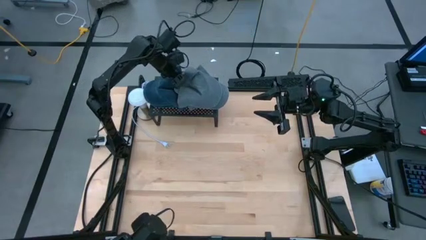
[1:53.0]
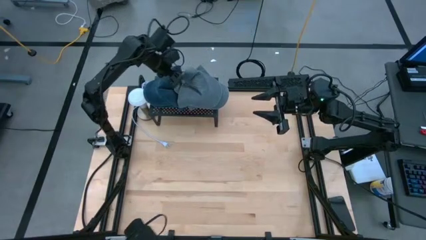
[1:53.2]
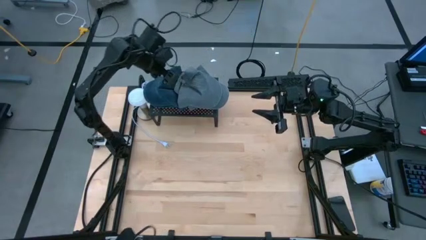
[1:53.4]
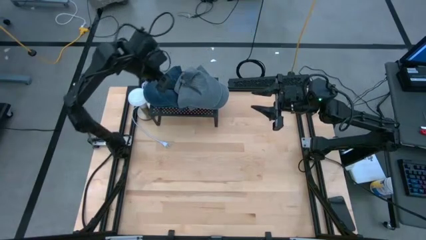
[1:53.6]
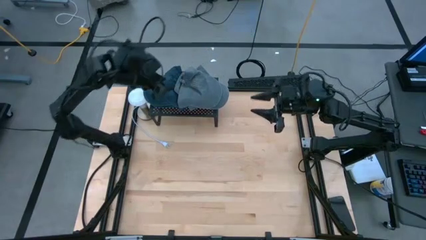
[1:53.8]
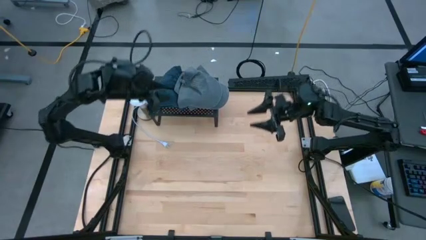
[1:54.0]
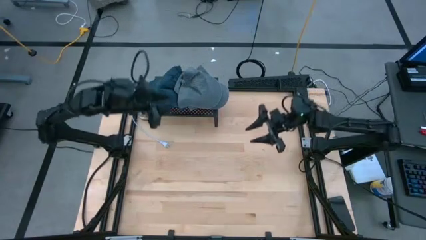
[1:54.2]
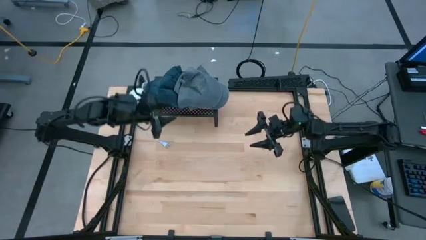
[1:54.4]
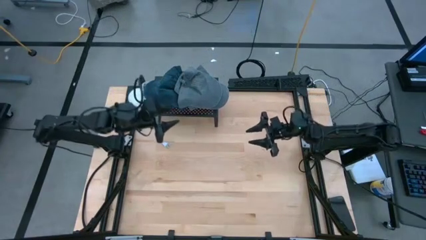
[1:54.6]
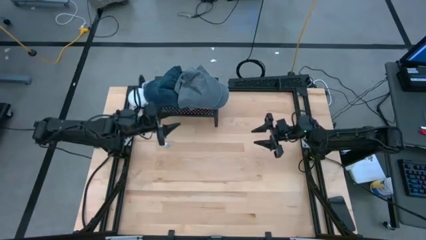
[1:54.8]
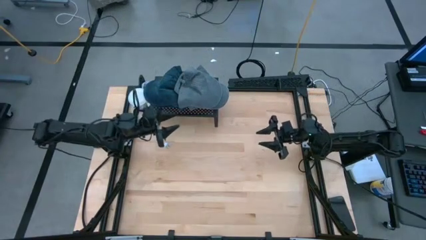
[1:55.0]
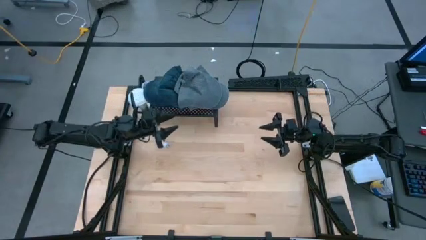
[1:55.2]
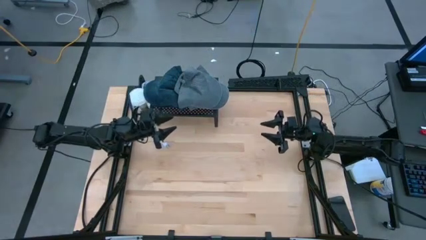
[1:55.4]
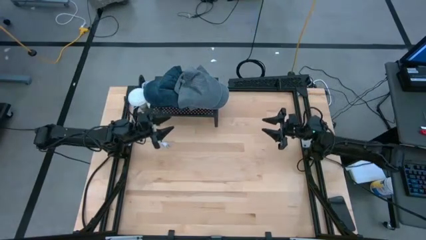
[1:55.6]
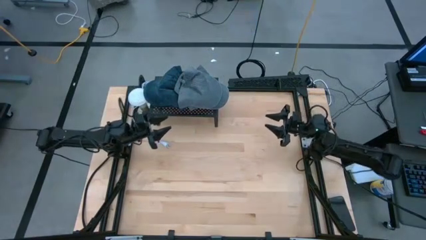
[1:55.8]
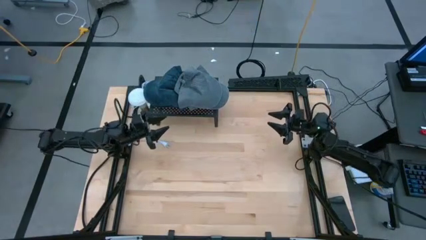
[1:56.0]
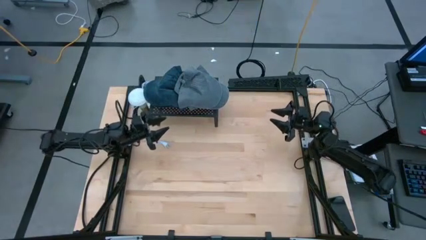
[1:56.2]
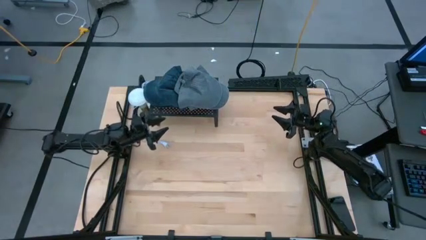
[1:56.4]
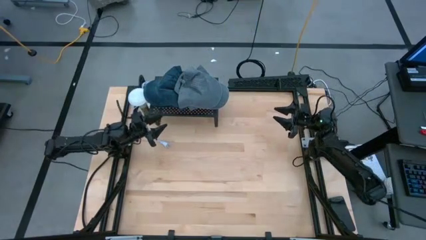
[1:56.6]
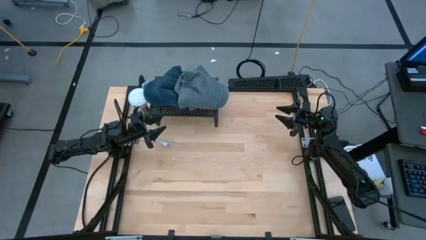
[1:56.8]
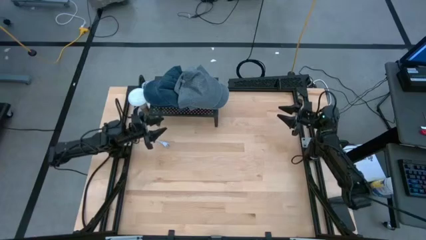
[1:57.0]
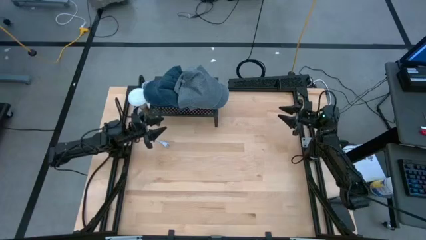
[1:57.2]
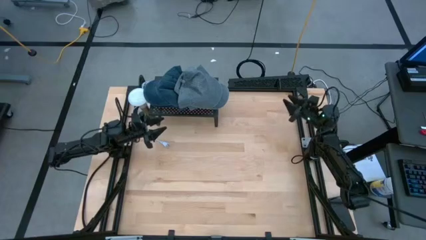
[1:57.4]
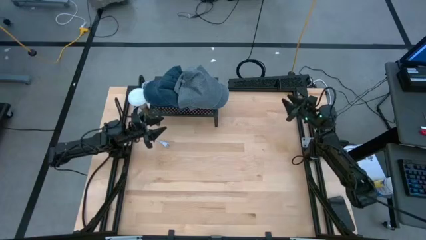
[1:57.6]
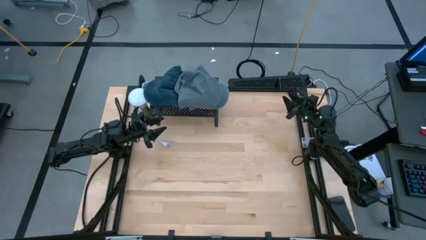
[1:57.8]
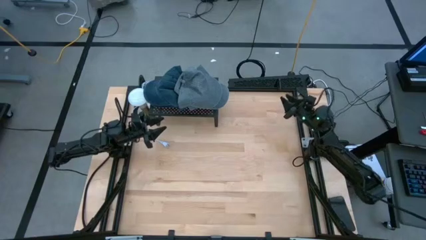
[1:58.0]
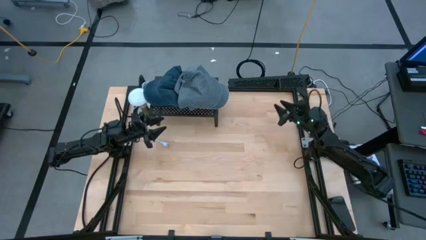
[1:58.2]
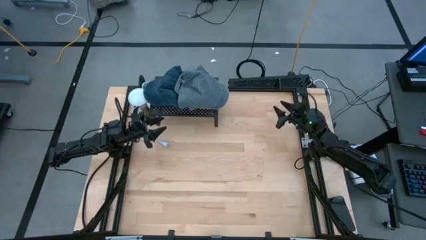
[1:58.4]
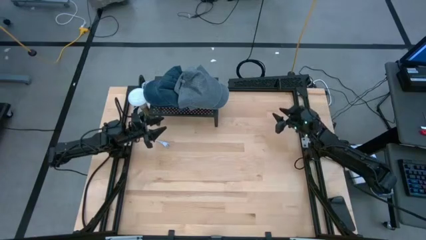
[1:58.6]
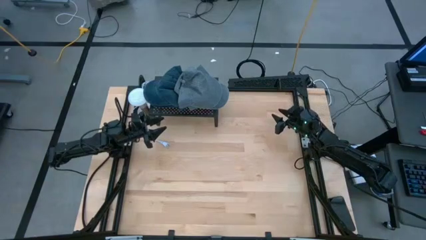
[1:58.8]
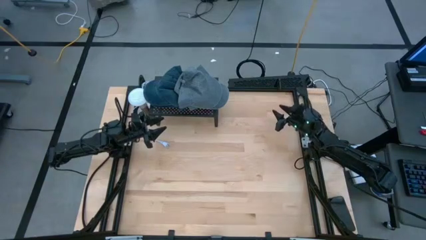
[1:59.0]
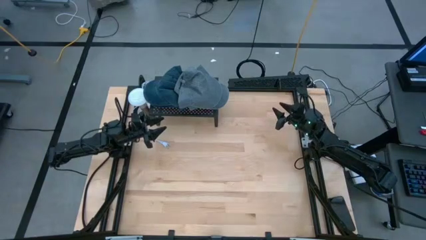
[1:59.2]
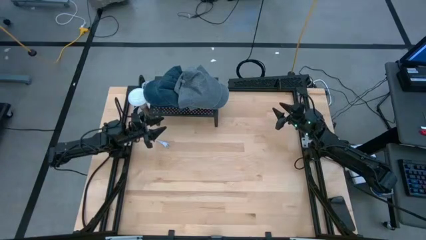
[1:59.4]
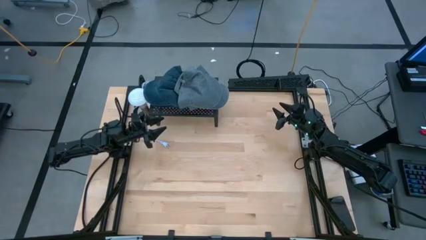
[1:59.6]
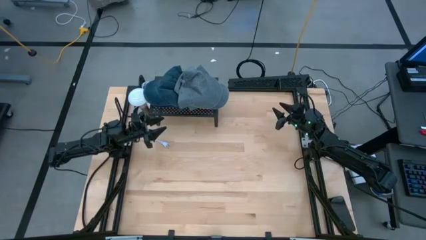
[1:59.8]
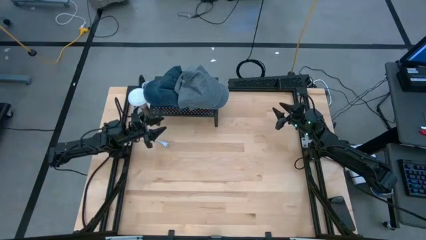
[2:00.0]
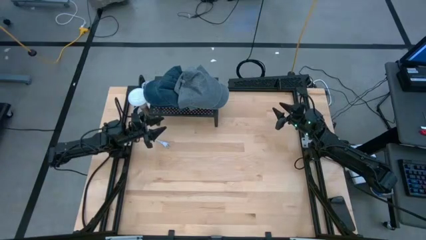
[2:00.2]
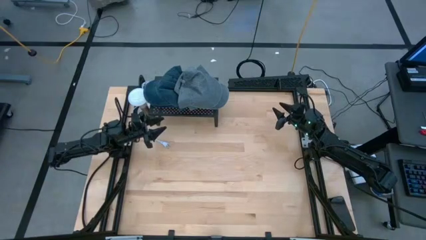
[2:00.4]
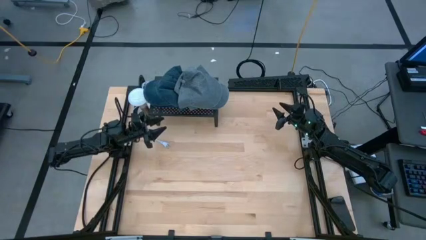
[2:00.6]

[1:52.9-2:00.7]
Task: Pick & Place hat
Return to Home Position

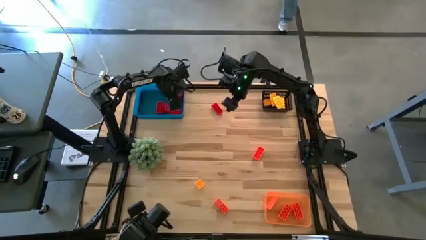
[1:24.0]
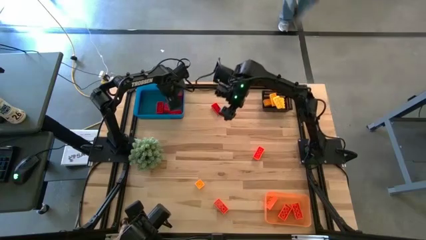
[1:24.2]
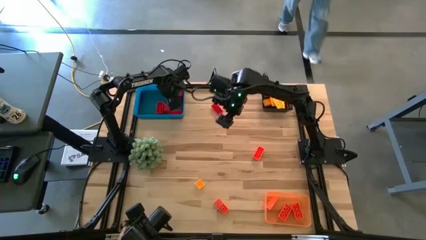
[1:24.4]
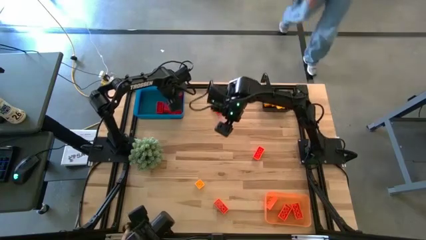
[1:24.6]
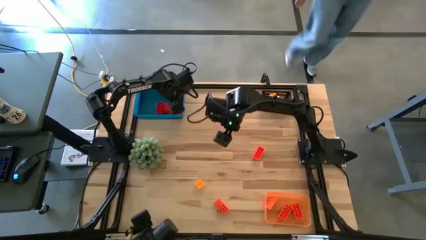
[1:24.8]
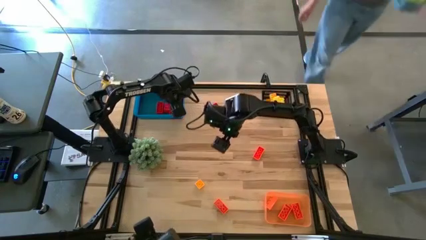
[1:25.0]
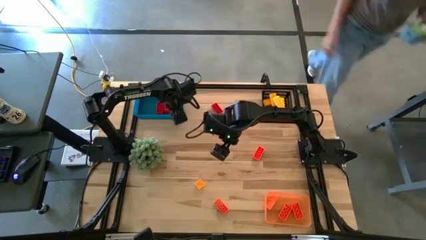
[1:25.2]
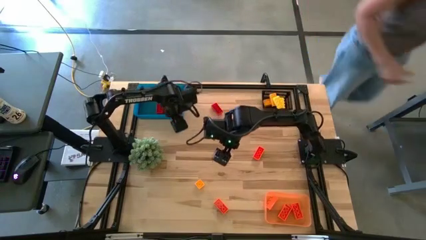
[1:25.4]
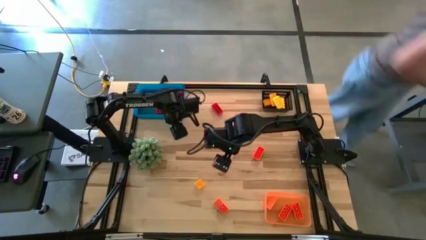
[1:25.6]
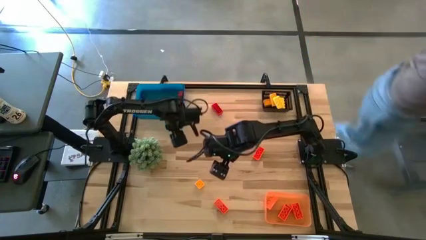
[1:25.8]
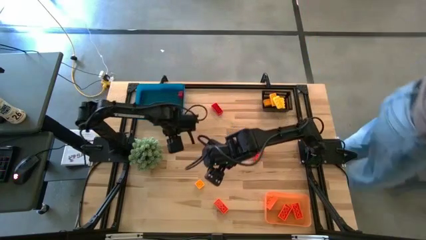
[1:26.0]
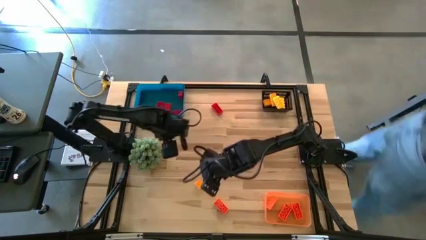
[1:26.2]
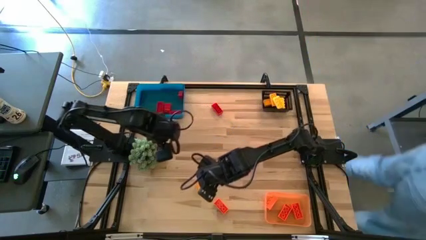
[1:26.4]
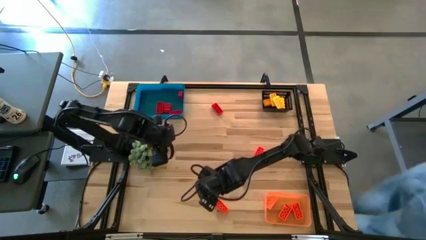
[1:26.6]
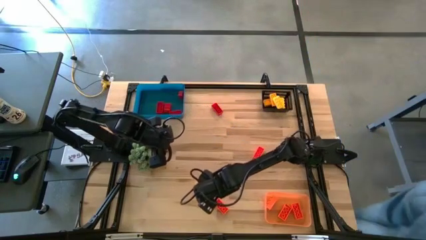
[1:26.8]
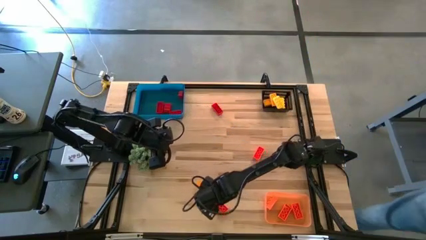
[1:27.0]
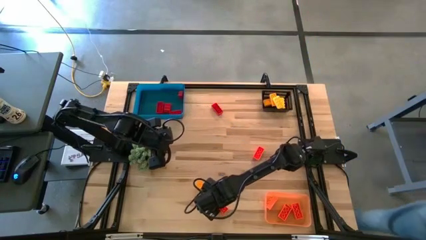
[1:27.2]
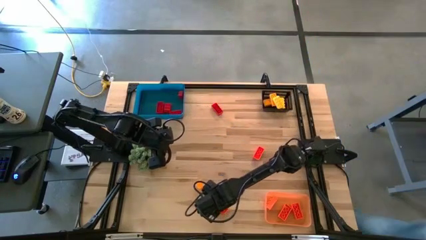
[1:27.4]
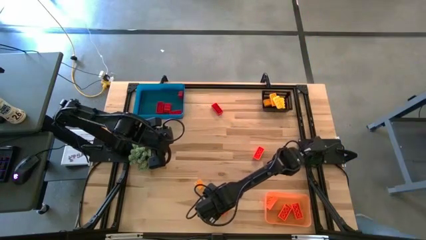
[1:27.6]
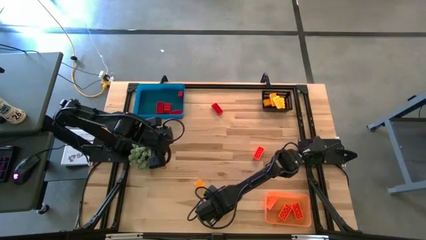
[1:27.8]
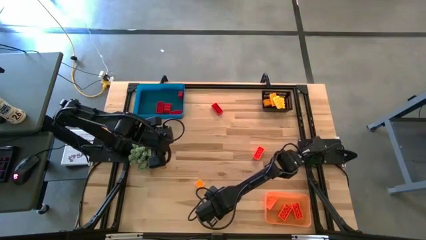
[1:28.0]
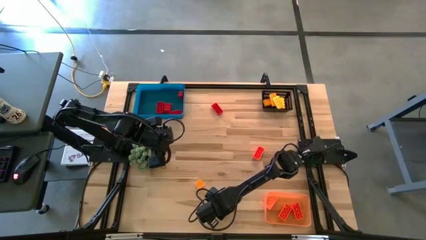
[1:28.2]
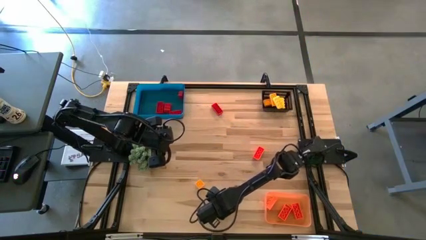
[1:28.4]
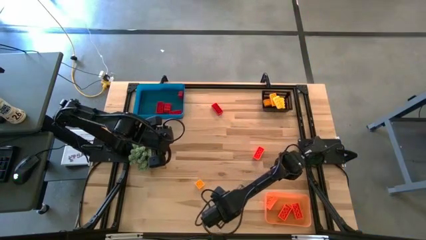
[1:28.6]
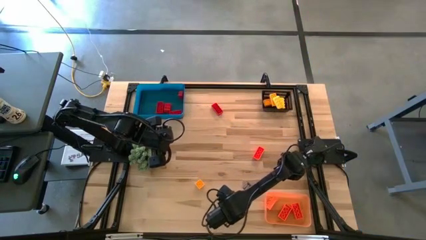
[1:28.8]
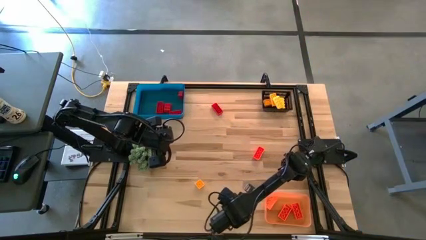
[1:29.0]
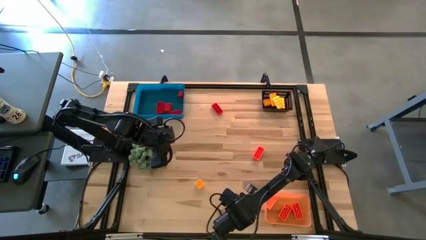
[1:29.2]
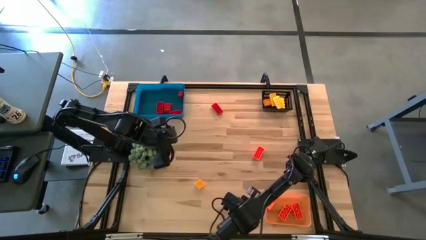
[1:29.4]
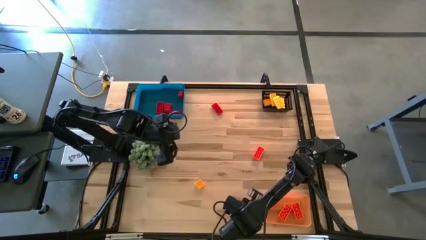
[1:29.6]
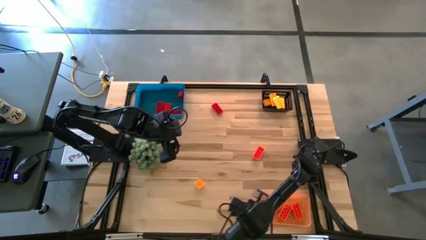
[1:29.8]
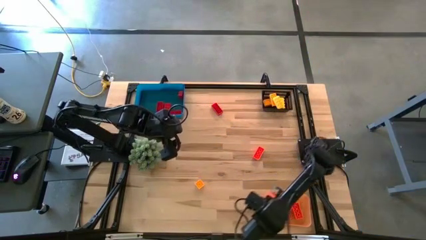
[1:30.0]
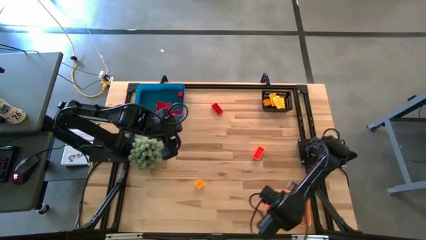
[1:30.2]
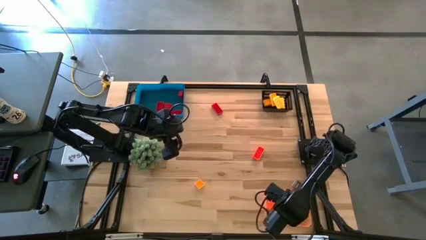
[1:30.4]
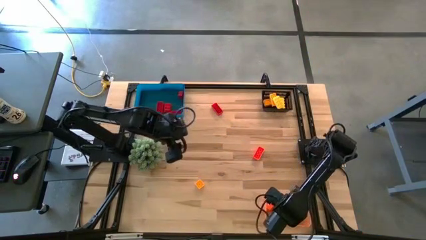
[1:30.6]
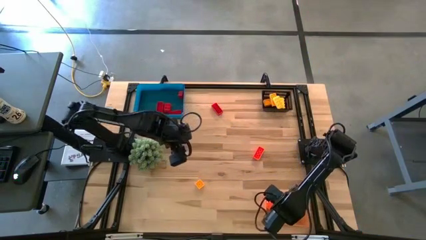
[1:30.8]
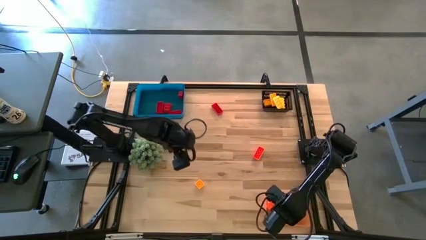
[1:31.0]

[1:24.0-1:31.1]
Task: Sort & place blocks by color
Put the orange game piece into the orange bin
